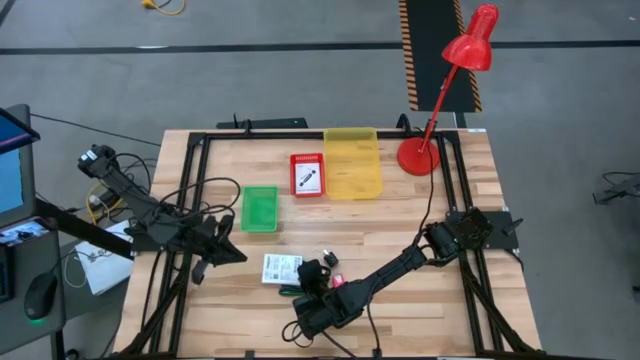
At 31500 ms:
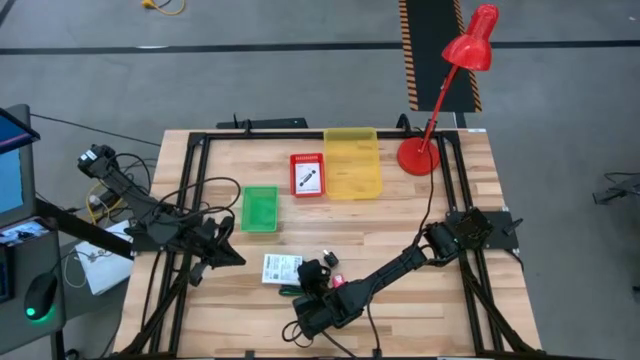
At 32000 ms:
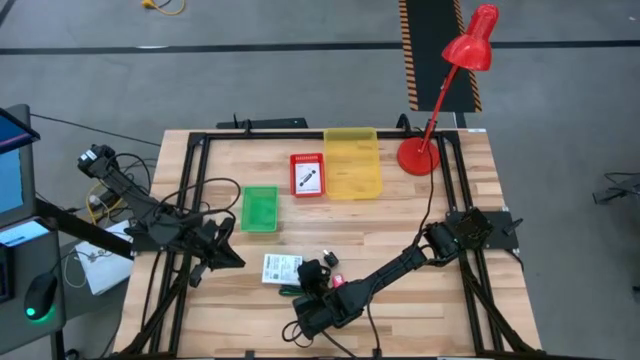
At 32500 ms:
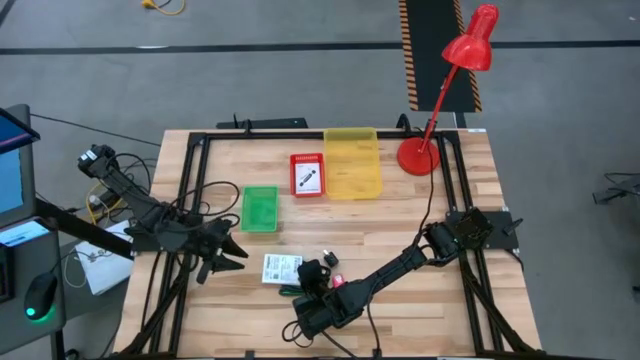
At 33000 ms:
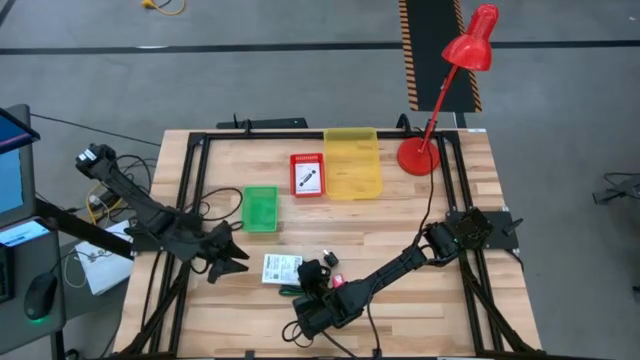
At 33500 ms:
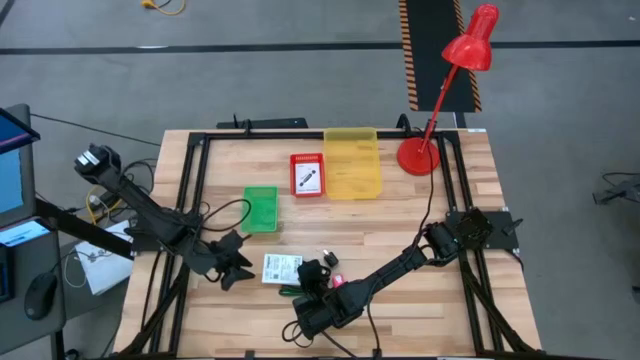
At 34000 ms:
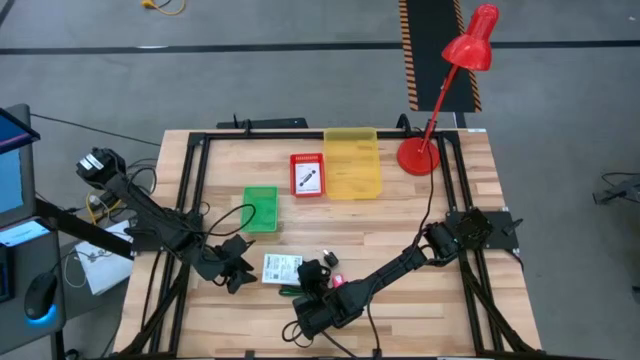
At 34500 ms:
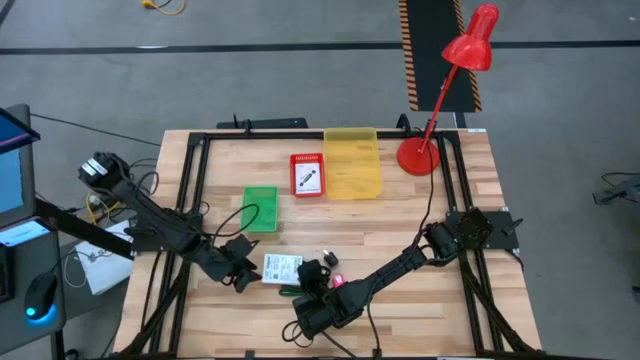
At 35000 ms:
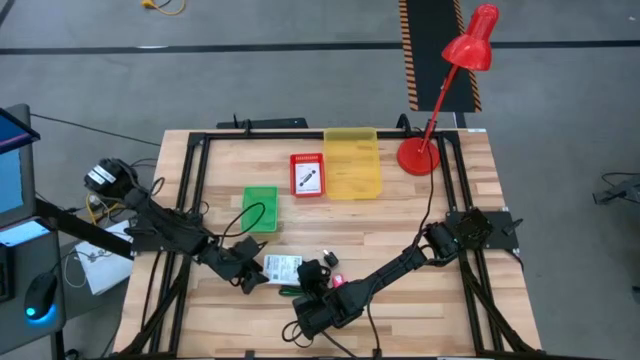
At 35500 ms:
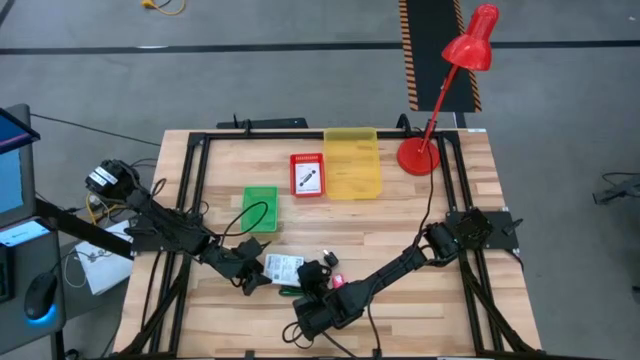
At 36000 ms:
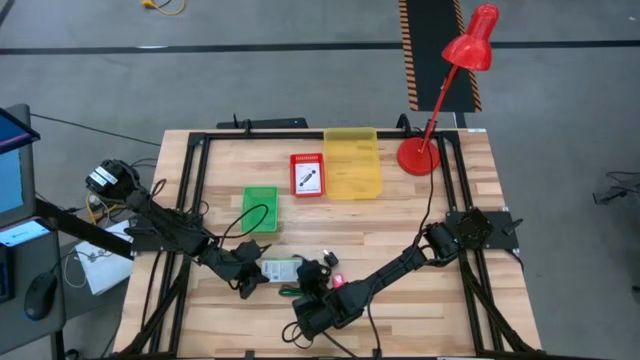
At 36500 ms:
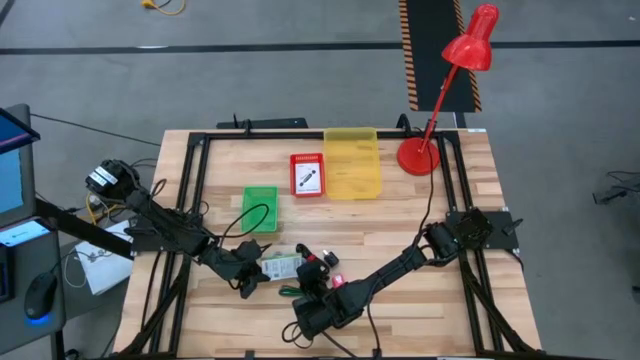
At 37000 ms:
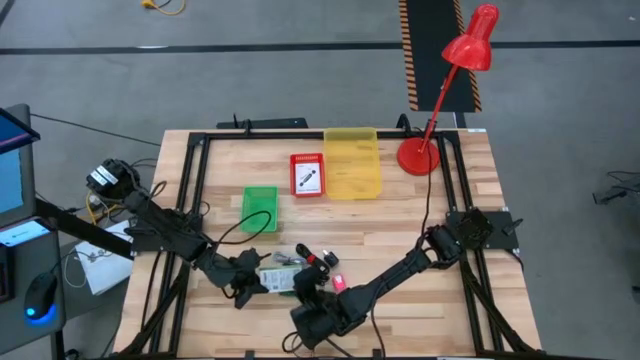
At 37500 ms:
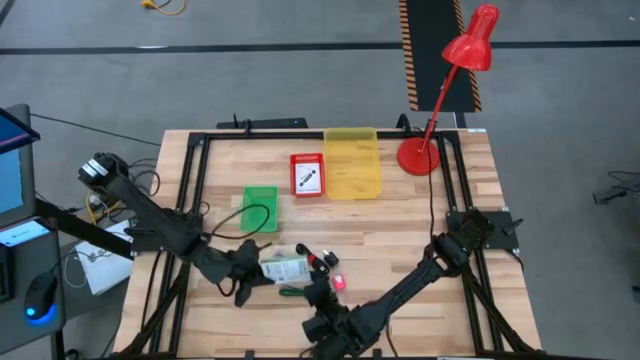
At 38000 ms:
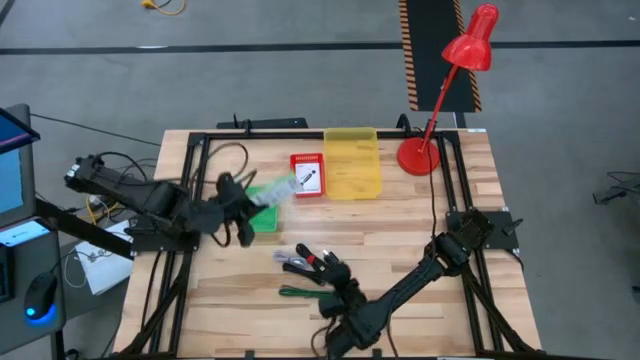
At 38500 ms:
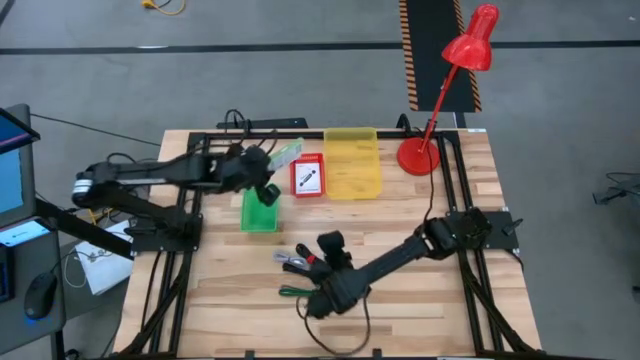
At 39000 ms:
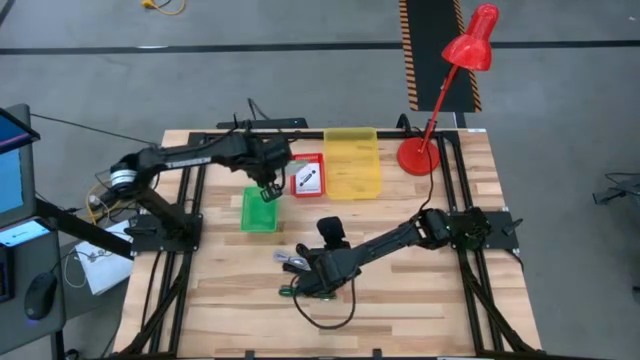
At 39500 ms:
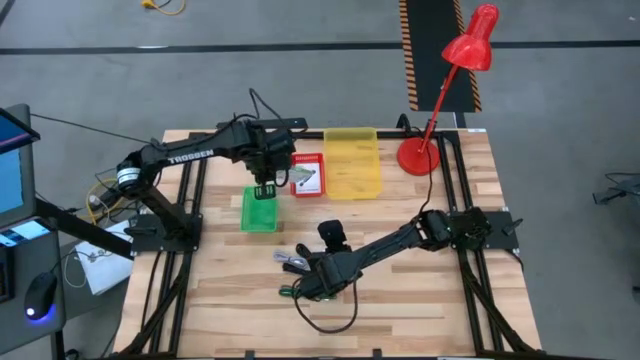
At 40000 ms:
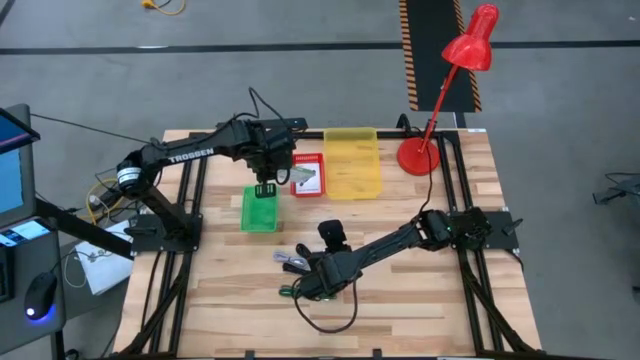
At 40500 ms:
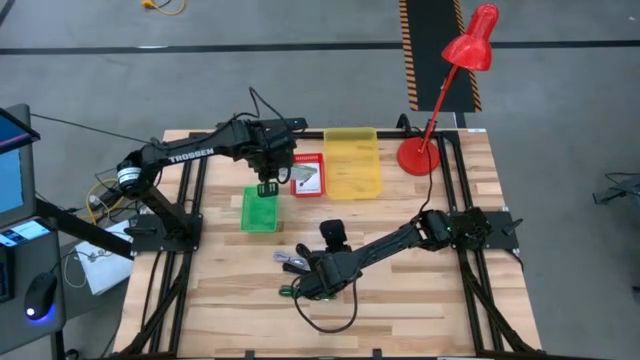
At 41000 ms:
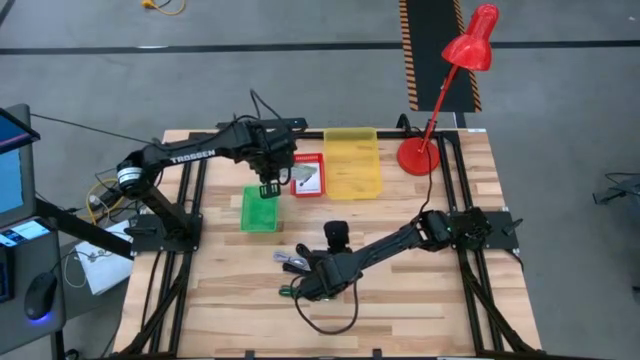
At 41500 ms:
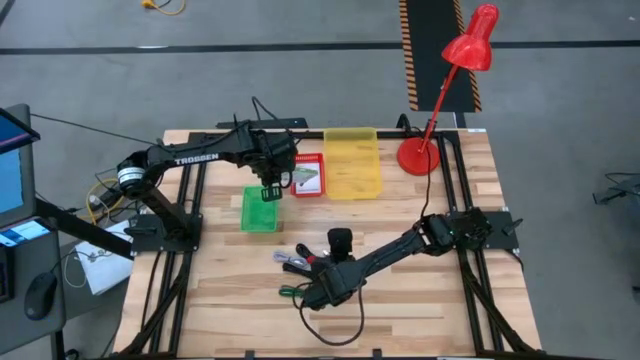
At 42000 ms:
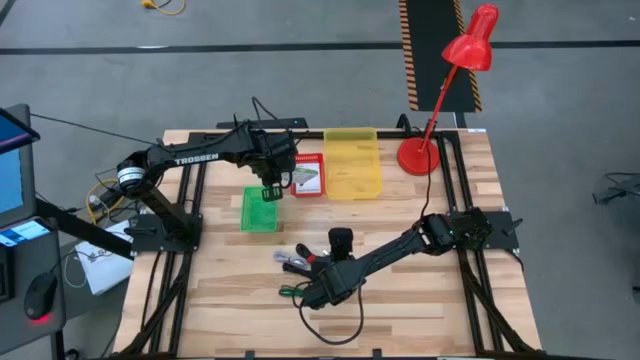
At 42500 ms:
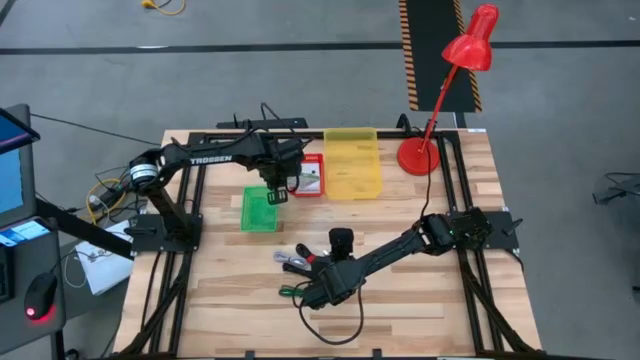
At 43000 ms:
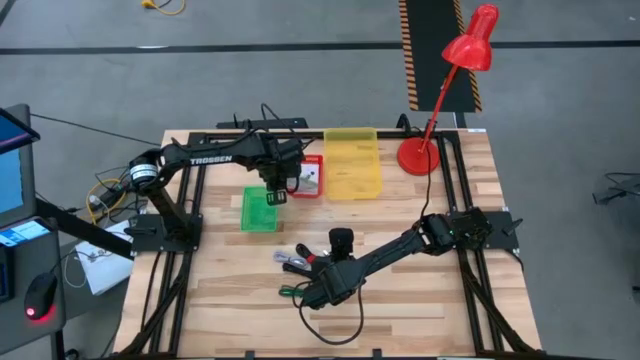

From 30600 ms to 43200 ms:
Task: Pick and place items into bin
Put the card reader box into the red bin

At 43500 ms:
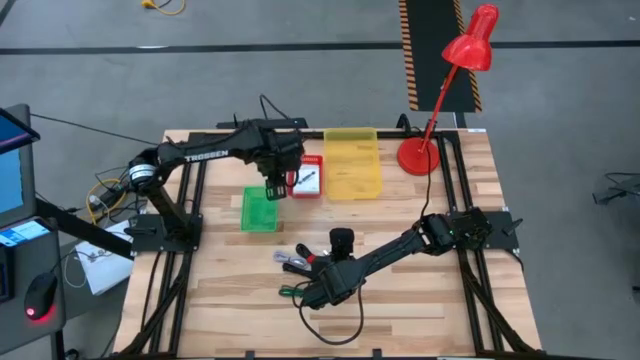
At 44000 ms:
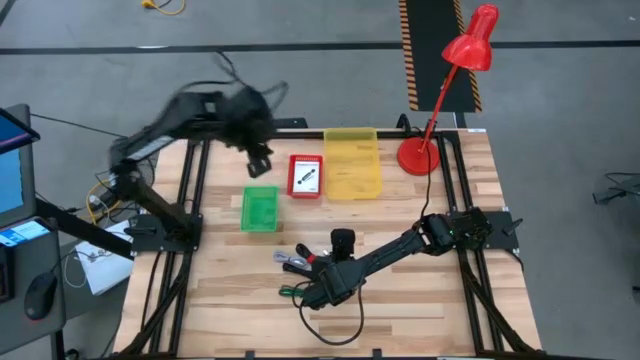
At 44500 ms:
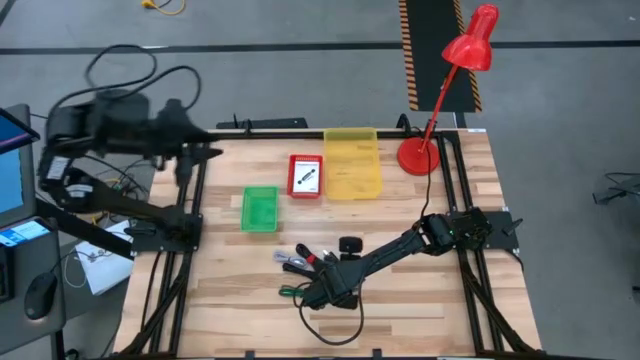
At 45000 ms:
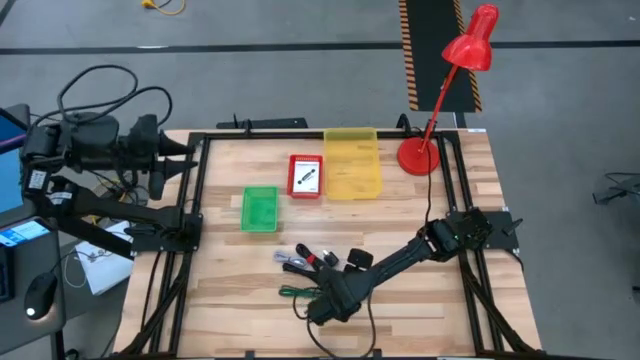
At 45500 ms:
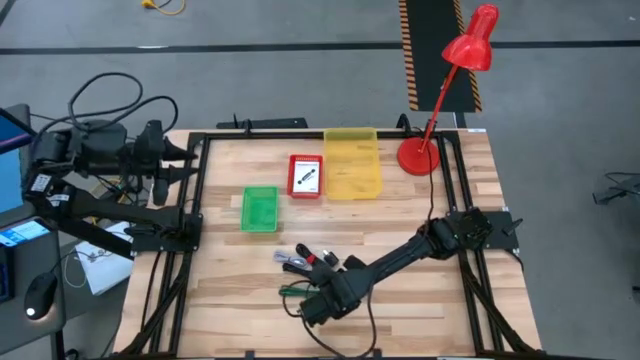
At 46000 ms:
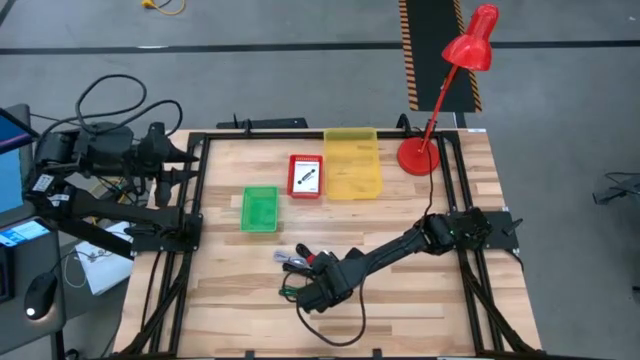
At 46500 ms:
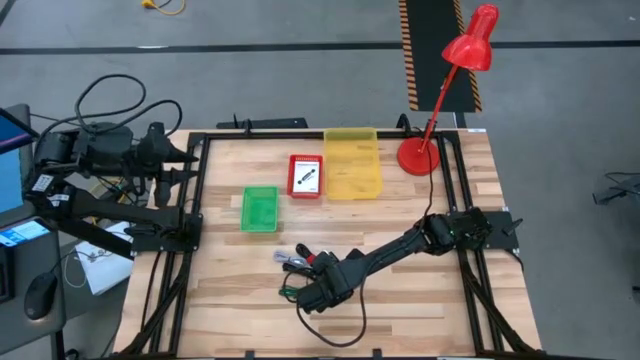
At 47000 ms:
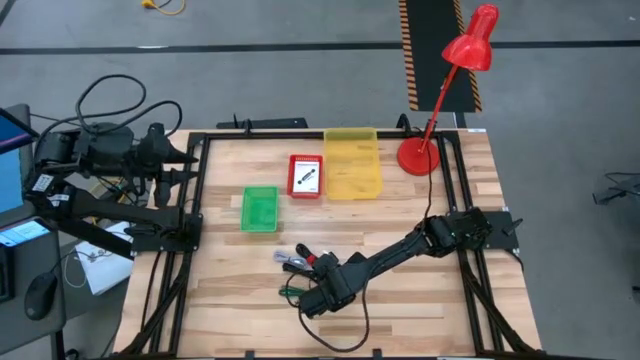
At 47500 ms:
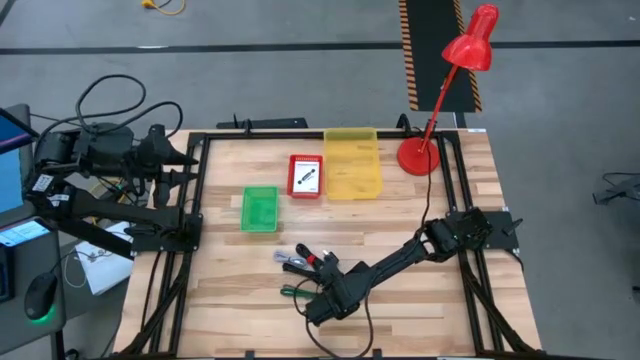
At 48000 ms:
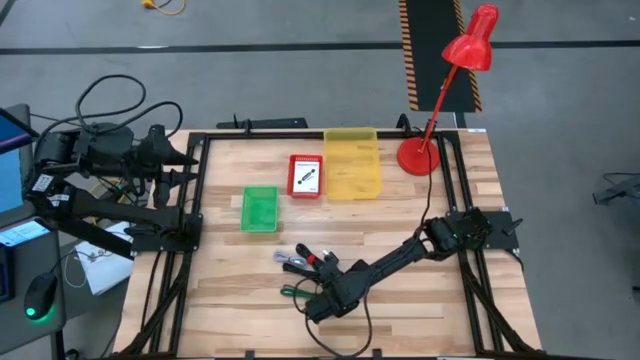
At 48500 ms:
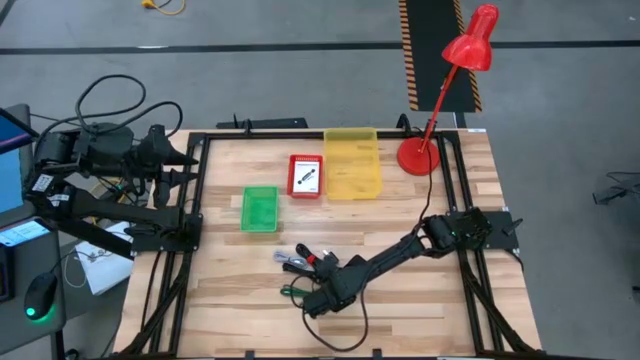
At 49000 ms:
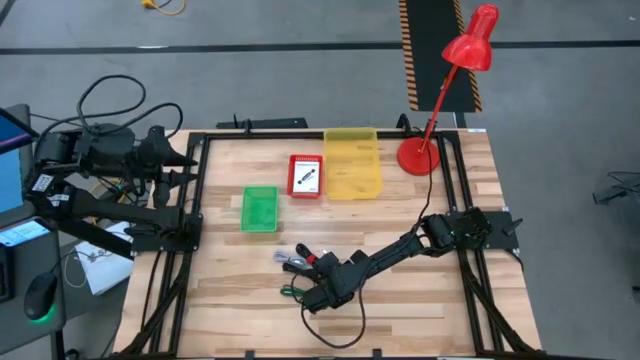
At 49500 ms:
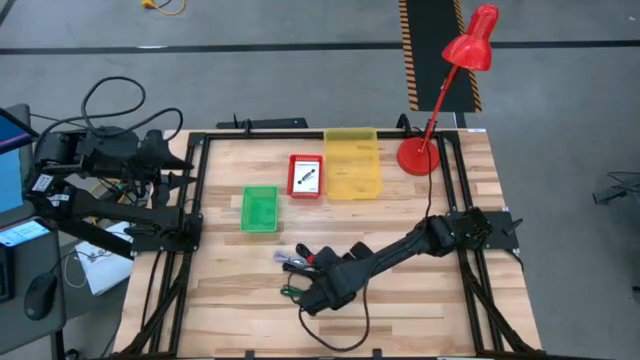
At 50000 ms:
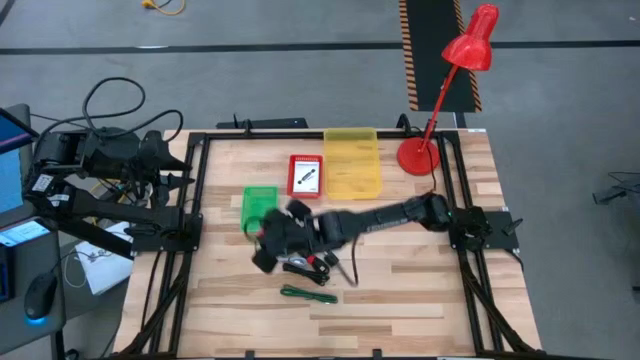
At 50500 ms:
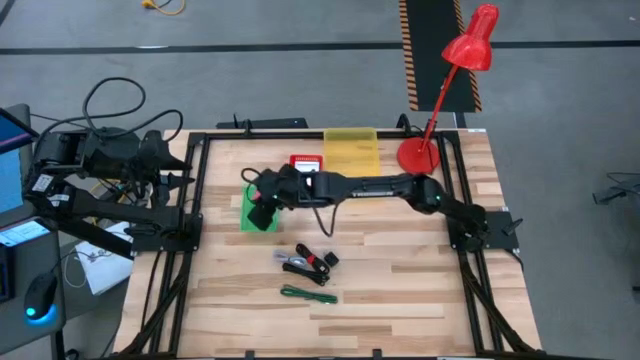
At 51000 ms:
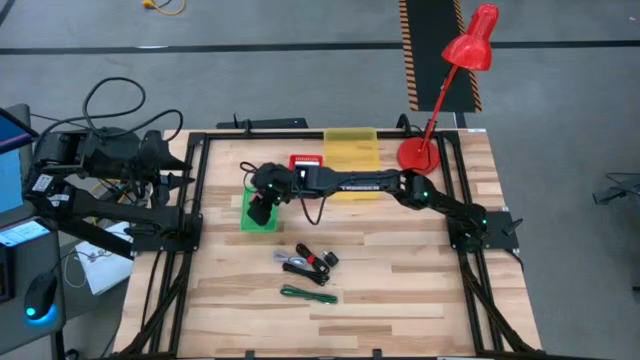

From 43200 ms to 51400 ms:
Put the pink charger adapter into the green bin

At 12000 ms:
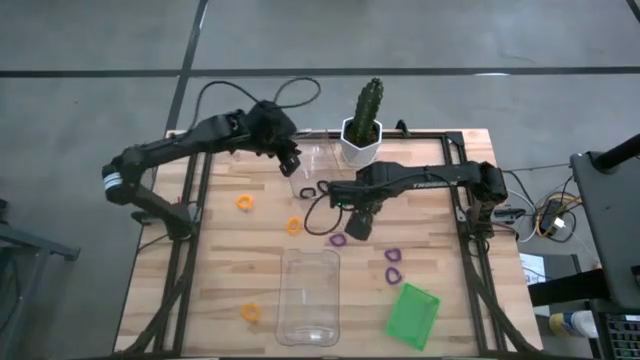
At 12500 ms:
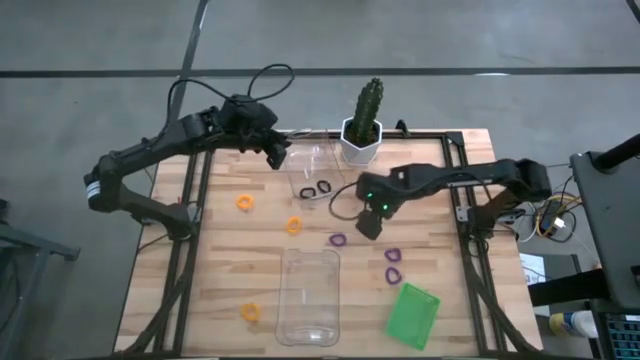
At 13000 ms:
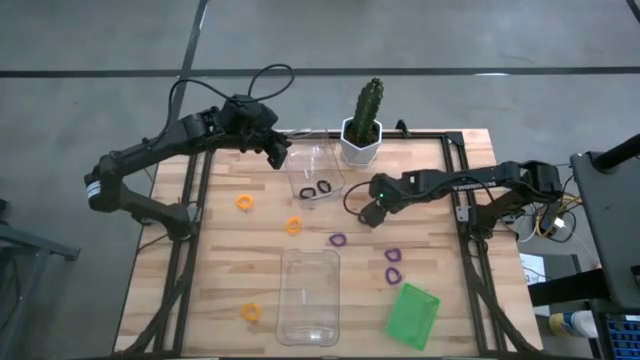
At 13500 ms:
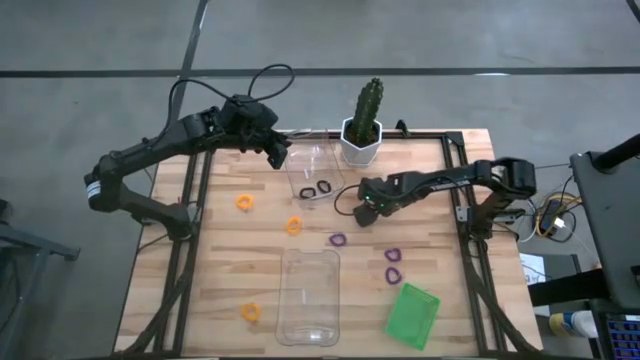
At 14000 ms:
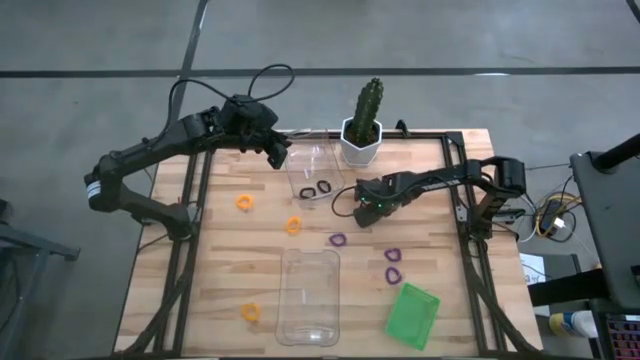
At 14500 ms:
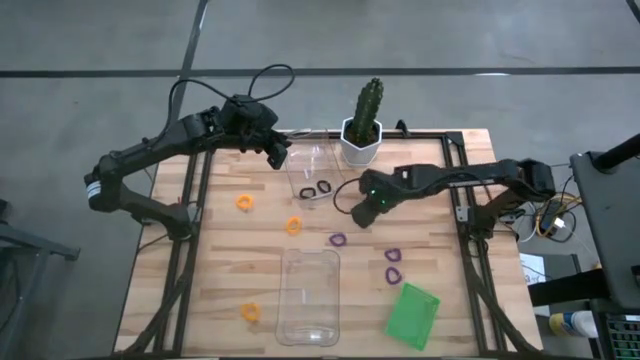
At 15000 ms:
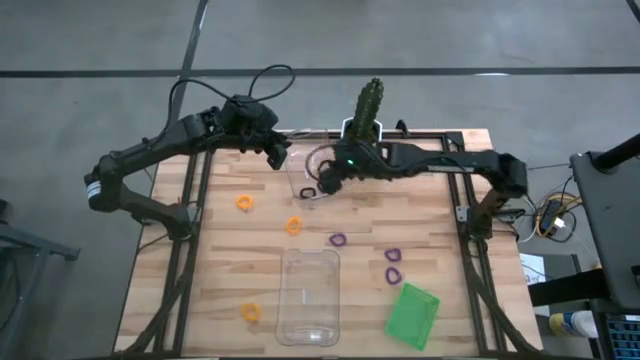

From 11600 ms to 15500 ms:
Task: Sort spring keychains
Put the black spring keychain into the top transparent bin
